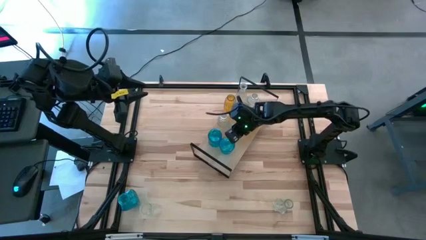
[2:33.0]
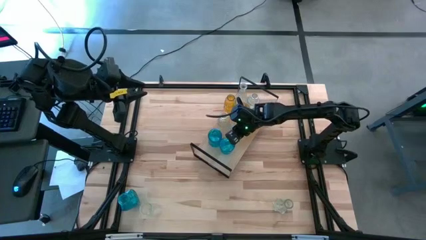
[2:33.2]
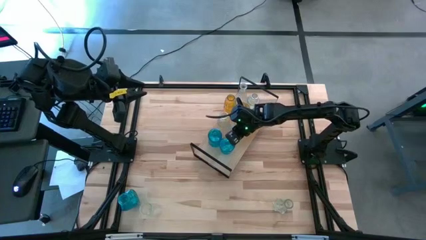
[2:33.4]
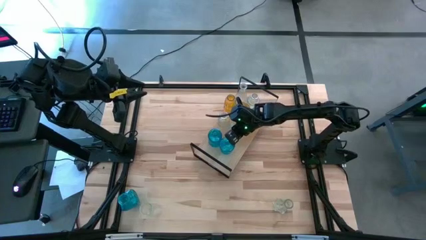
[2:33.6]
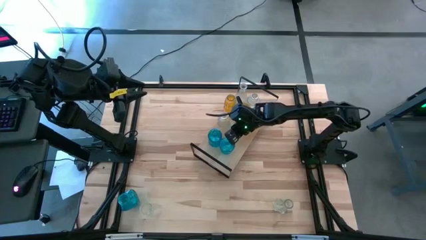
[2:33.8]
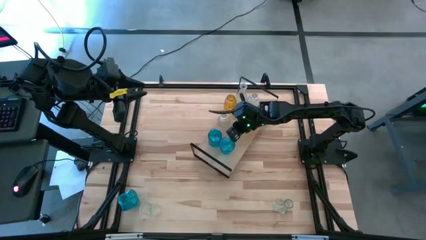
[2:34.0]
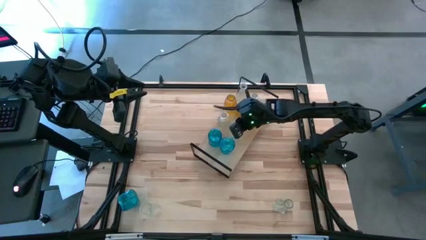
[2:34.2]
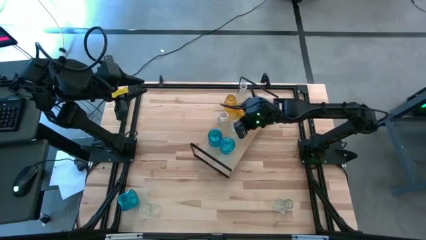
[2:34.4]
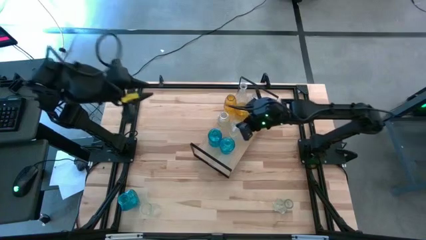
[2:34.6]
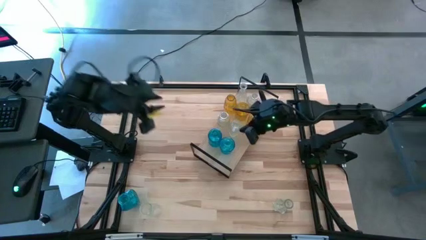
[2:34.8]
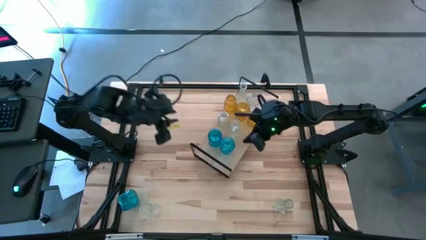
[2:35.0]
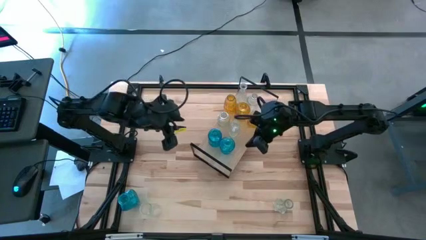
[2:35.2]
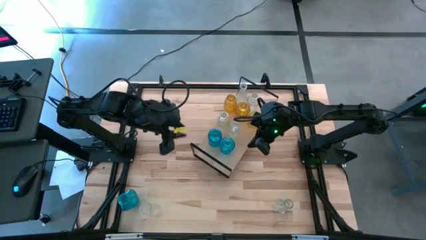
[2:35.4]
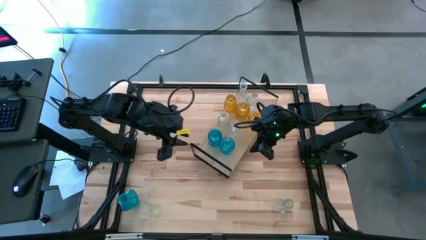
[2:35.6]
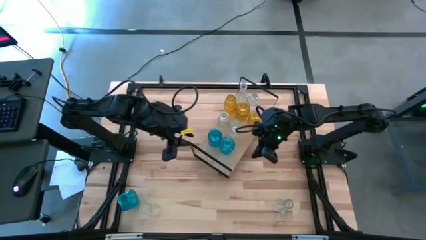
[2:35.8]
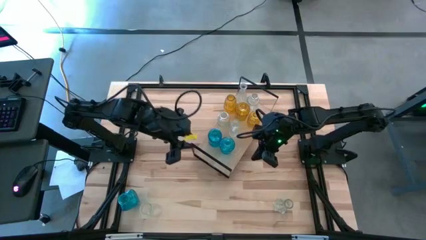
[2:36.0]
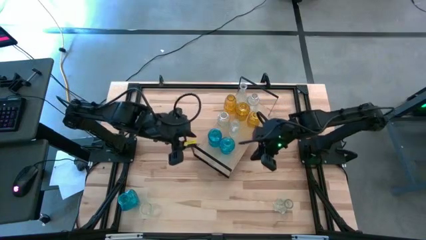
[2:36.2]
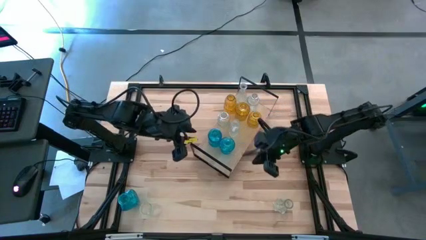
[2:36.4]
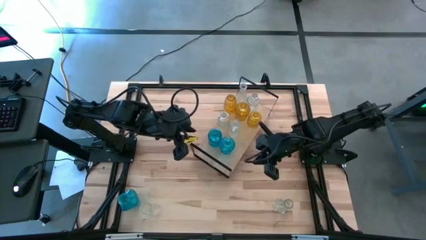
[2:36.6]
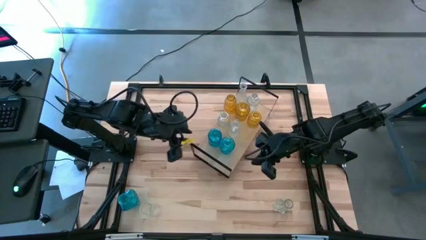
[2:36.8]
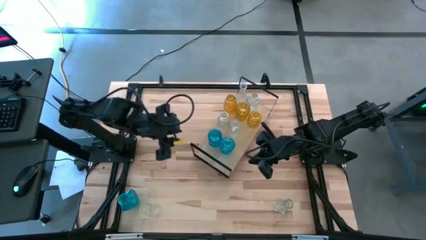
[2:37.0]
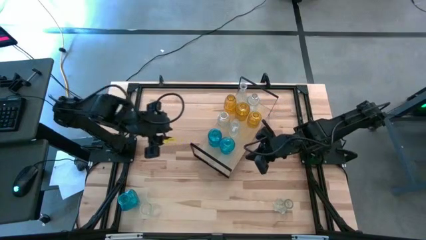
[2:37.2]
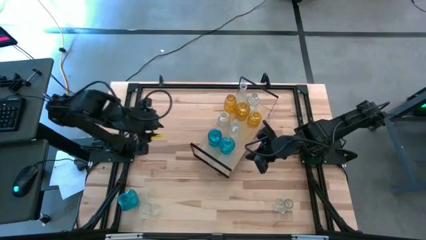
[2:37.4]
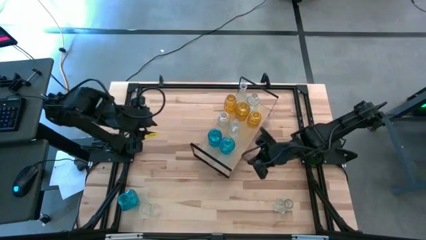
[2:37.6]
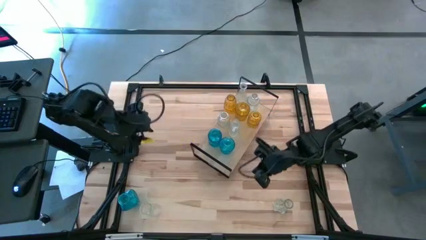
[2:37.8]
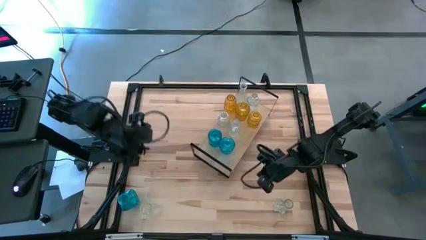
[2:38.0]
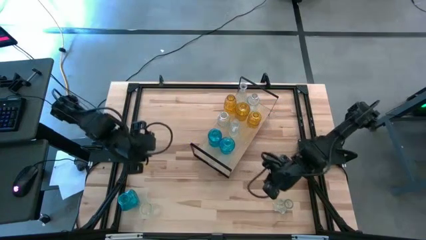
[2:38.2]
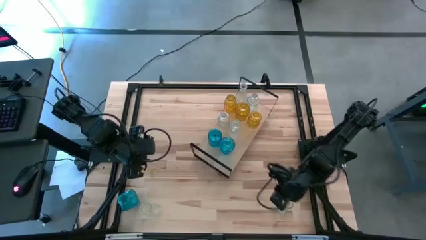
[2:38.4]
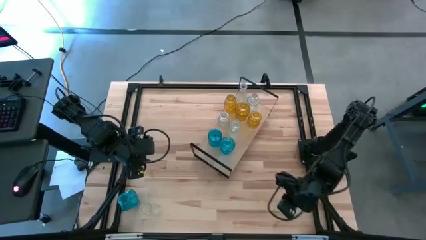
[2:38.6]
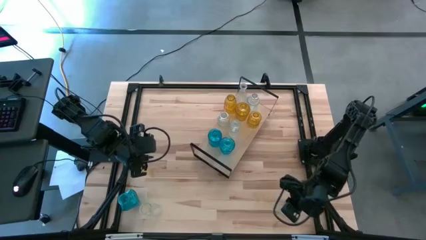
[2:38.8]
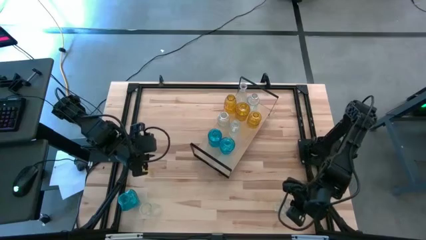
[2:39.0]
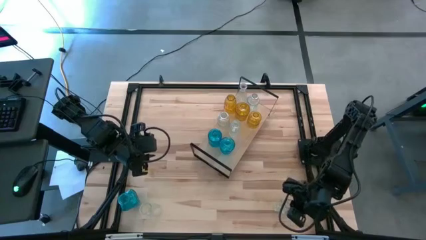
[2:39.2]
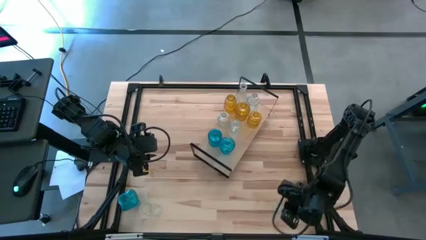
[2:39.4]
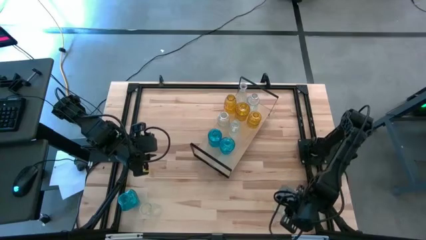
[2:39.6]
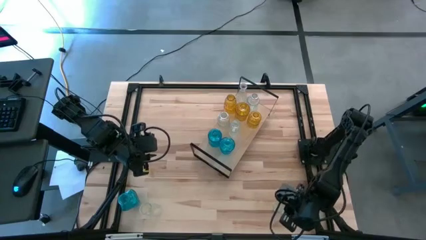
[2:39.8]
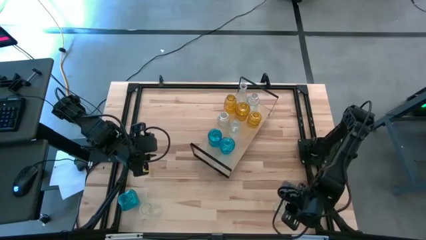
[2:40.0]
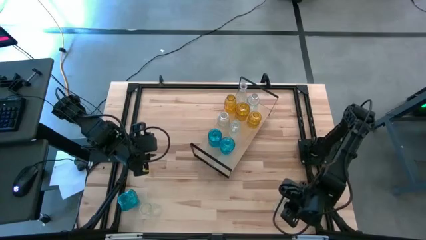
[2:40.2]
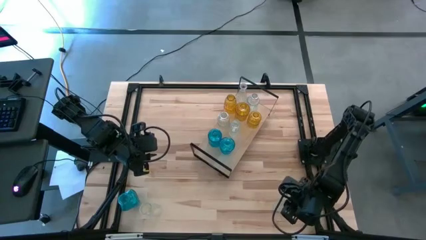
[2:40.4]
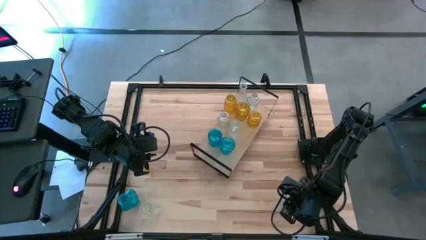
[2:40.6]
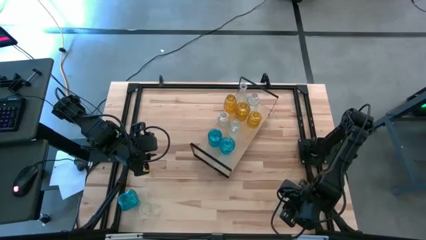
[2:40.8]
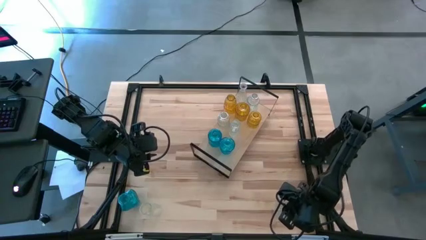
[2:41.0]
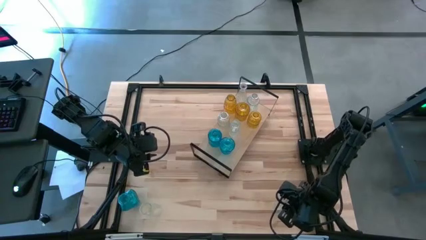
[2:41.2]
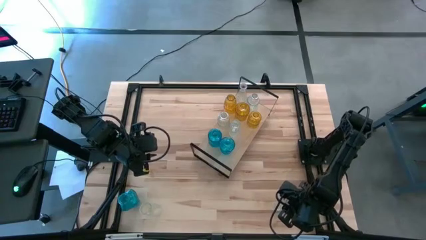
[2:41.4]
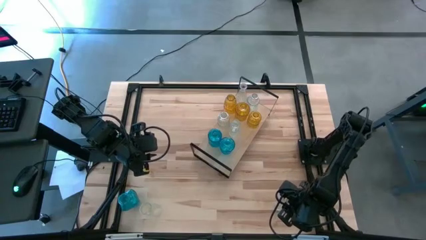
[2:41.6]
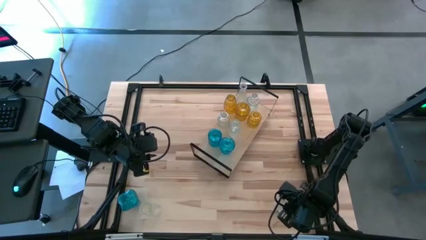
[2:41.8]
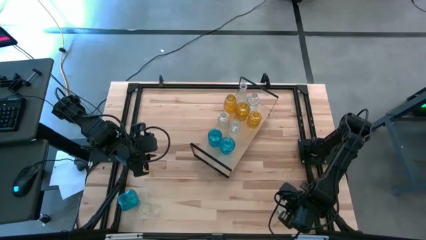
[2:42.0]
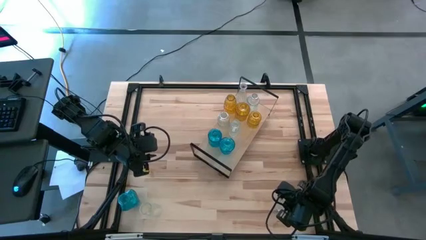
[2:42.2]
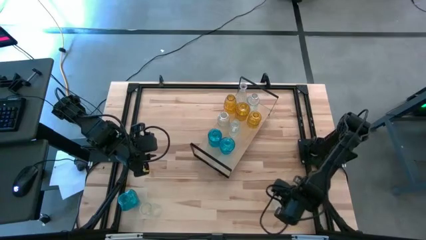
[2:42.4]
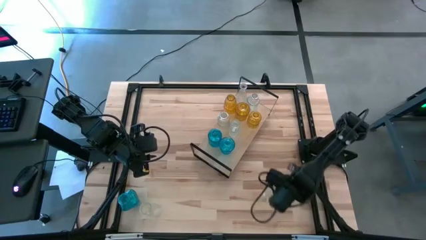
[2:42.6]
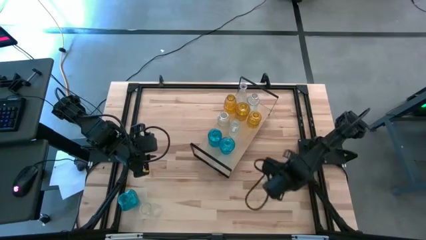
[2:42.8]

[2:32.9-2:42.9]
Task: sort vases onto shelf
Put the right transparent vase on the shelf and align with the other transparent vase
